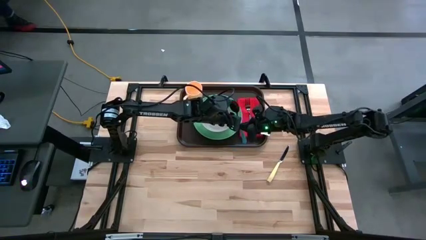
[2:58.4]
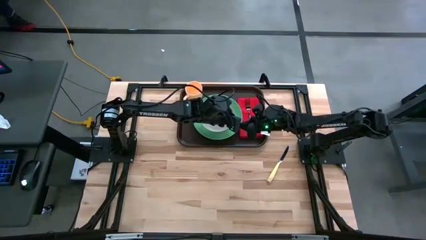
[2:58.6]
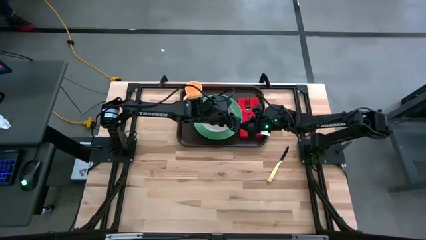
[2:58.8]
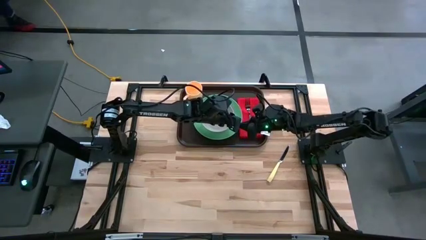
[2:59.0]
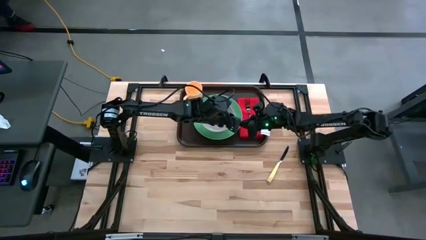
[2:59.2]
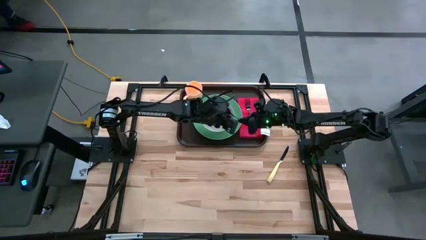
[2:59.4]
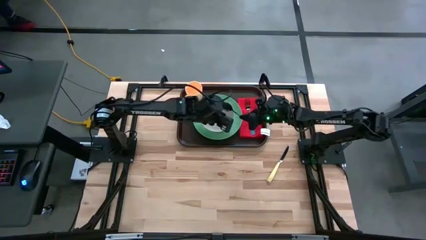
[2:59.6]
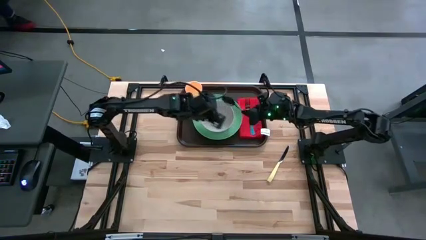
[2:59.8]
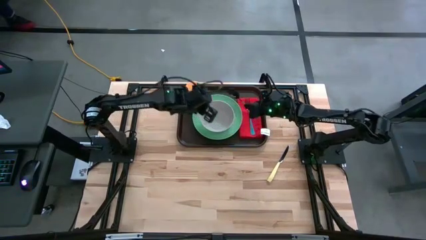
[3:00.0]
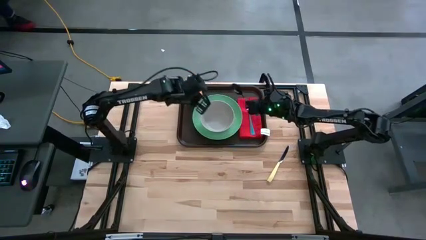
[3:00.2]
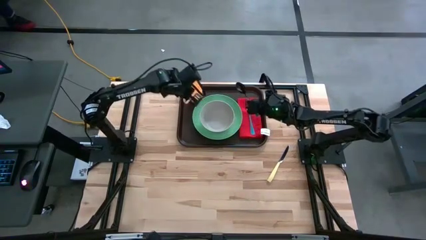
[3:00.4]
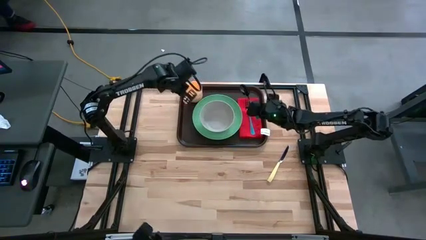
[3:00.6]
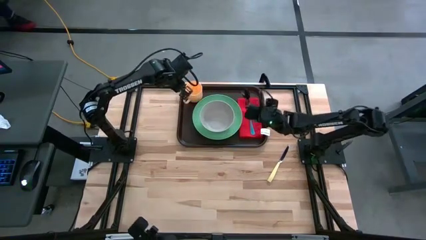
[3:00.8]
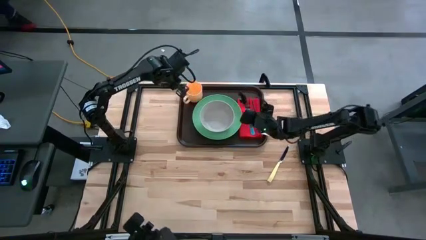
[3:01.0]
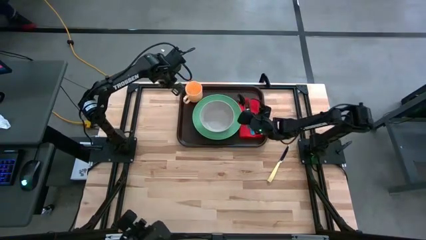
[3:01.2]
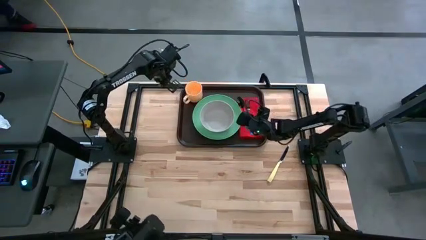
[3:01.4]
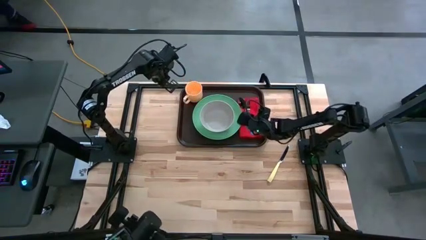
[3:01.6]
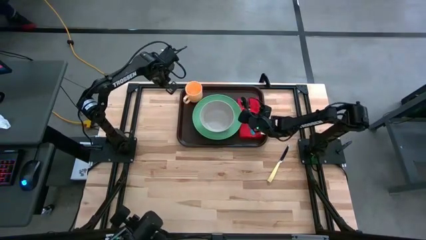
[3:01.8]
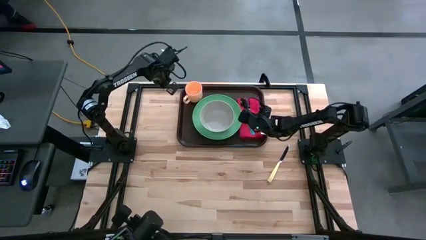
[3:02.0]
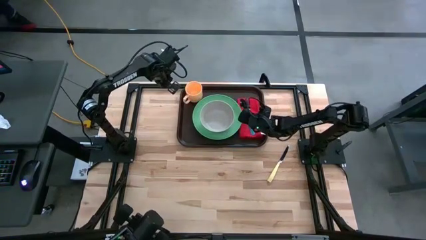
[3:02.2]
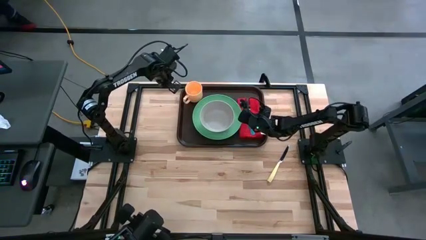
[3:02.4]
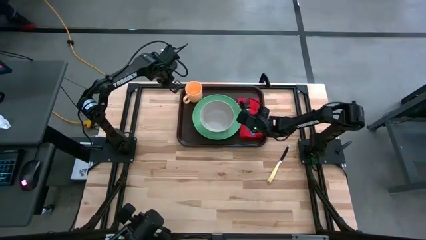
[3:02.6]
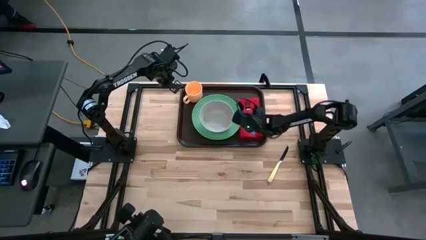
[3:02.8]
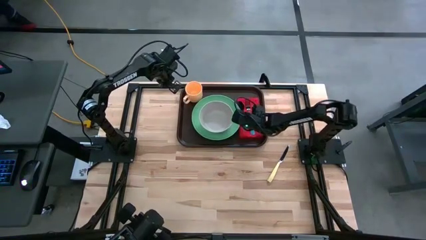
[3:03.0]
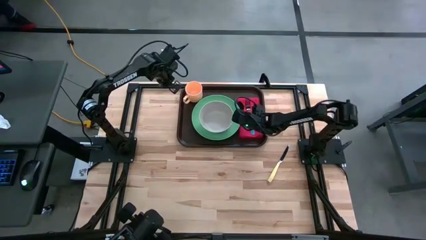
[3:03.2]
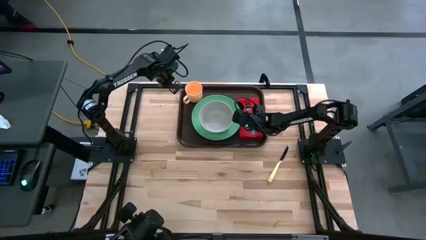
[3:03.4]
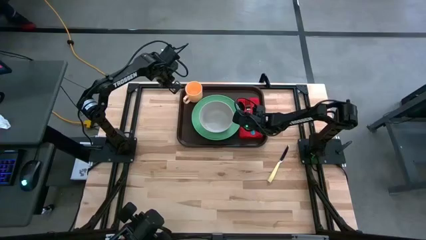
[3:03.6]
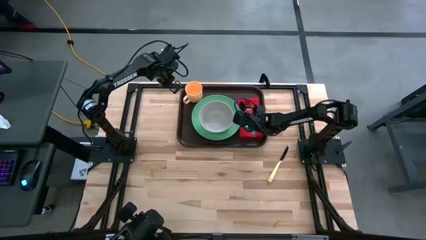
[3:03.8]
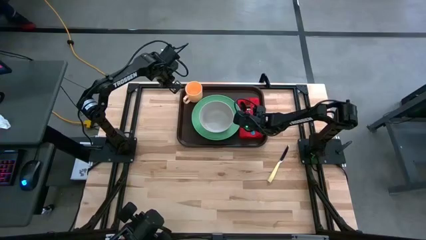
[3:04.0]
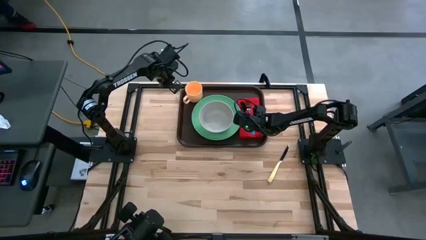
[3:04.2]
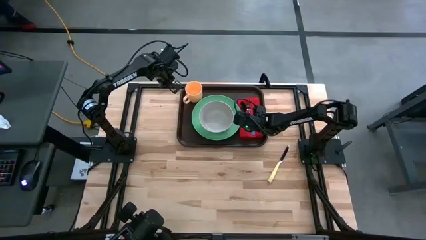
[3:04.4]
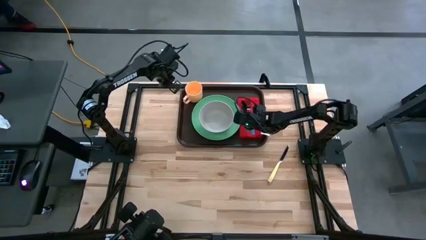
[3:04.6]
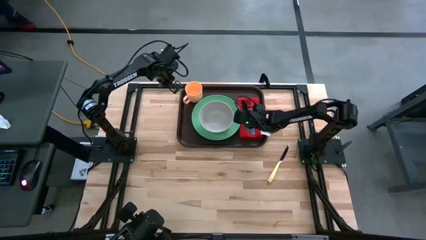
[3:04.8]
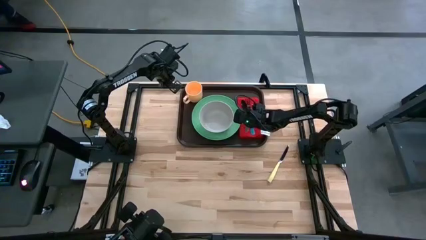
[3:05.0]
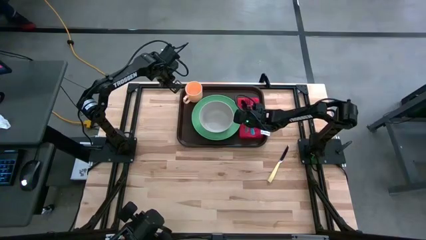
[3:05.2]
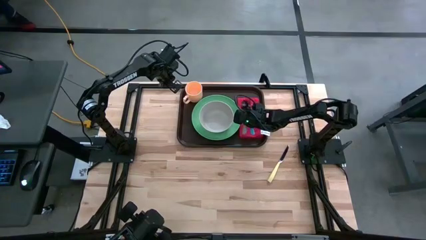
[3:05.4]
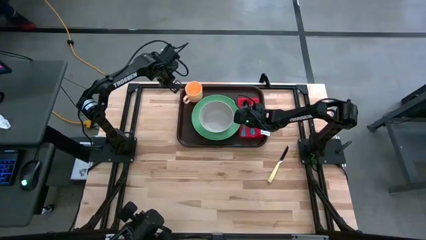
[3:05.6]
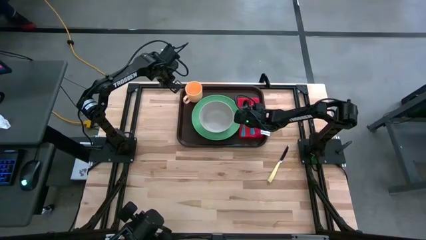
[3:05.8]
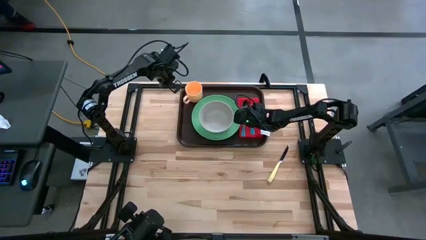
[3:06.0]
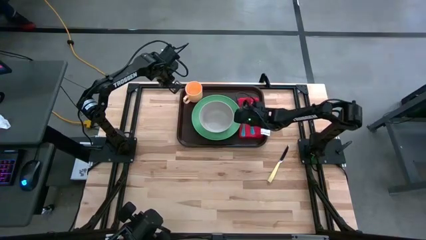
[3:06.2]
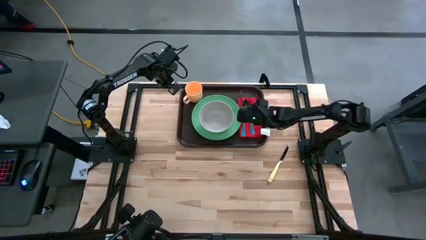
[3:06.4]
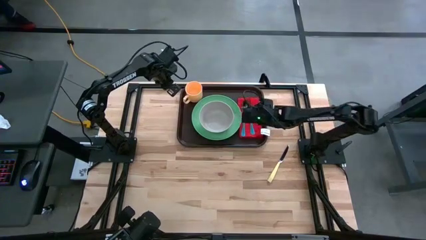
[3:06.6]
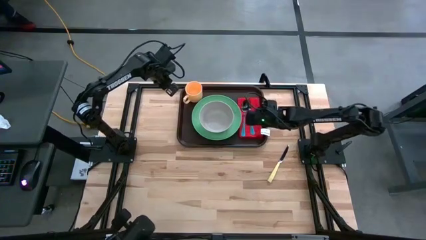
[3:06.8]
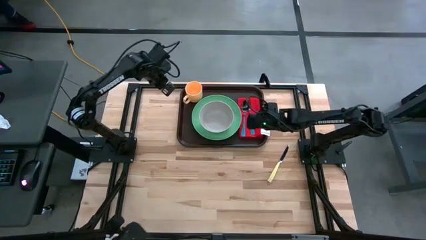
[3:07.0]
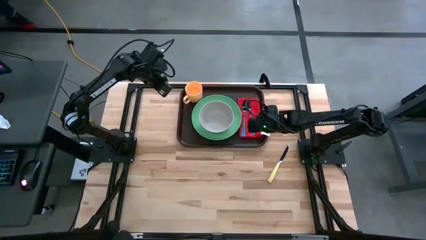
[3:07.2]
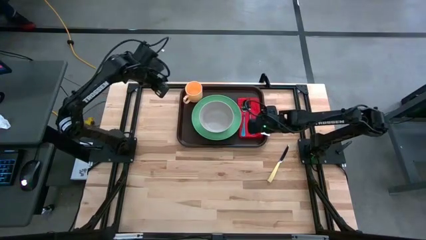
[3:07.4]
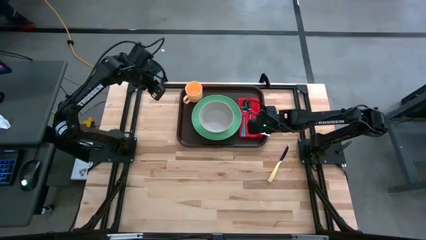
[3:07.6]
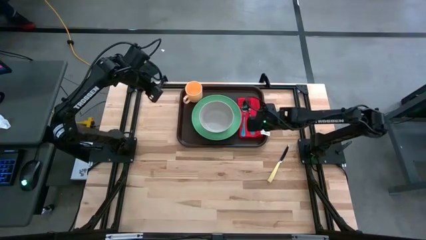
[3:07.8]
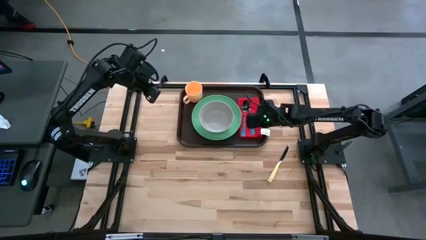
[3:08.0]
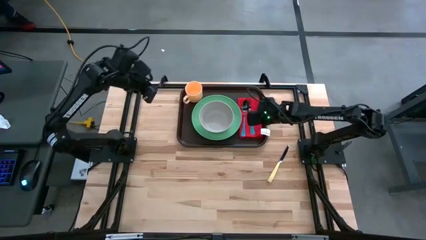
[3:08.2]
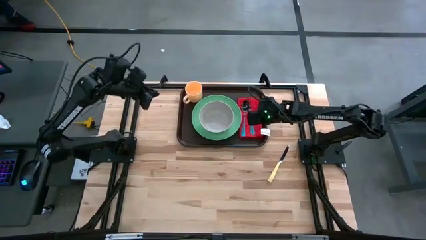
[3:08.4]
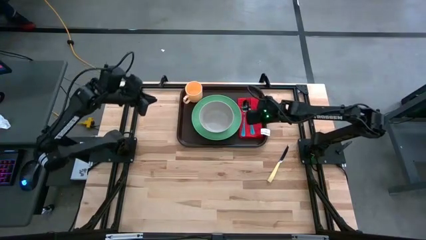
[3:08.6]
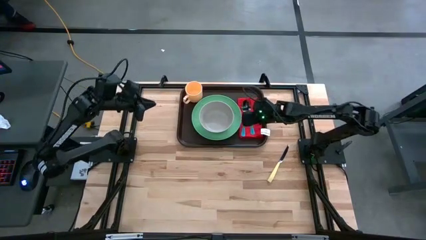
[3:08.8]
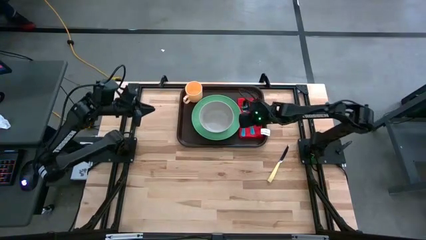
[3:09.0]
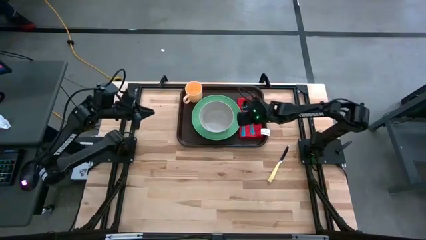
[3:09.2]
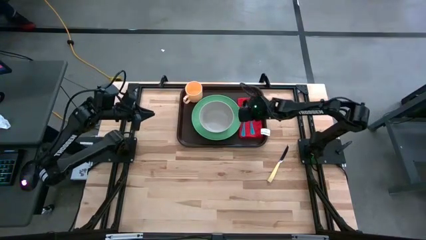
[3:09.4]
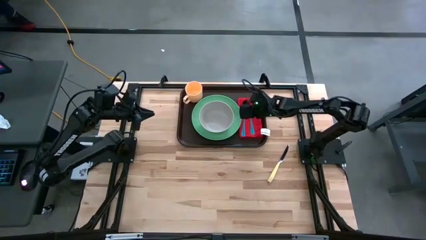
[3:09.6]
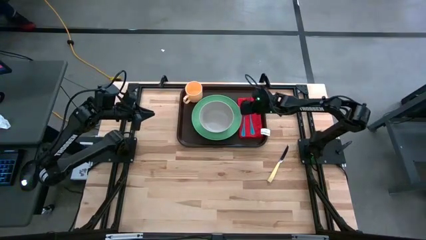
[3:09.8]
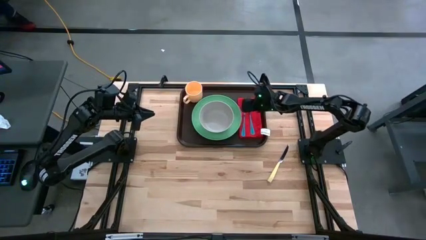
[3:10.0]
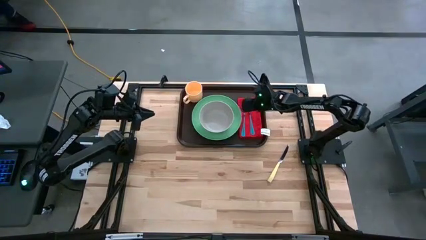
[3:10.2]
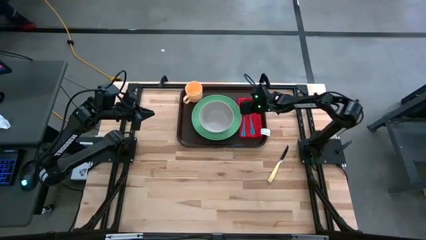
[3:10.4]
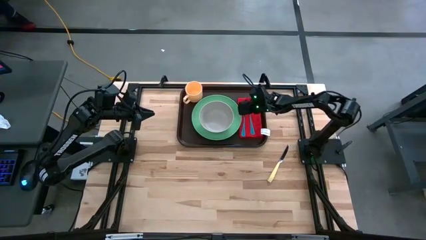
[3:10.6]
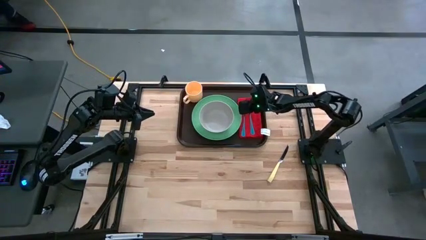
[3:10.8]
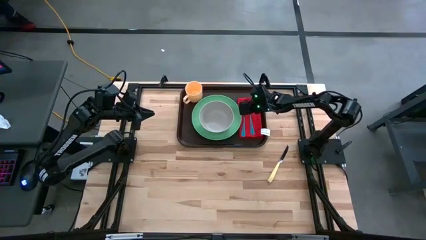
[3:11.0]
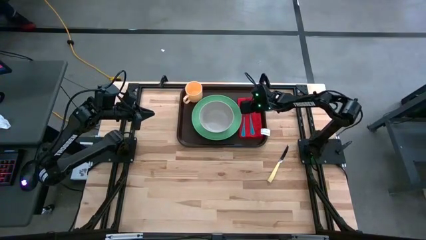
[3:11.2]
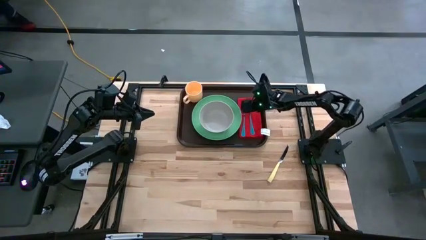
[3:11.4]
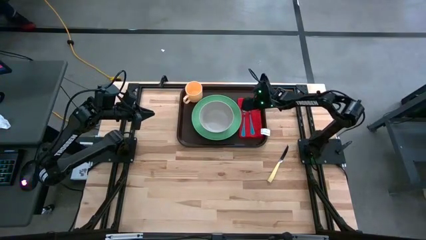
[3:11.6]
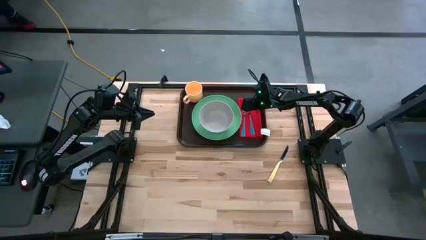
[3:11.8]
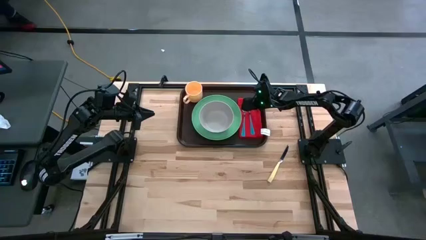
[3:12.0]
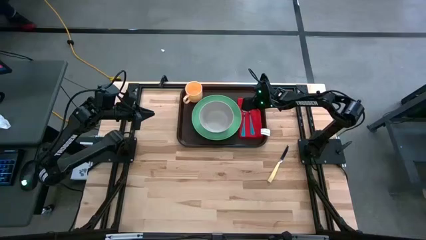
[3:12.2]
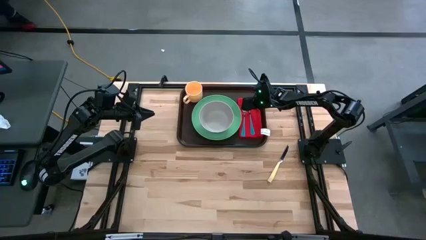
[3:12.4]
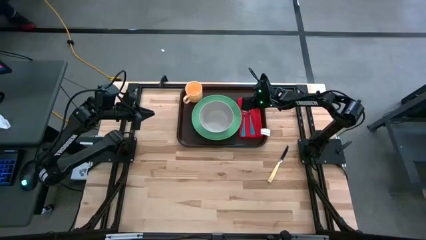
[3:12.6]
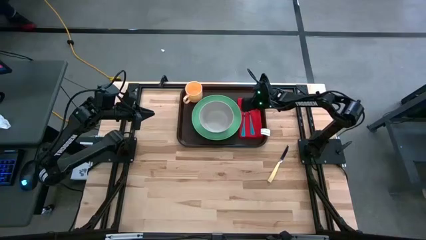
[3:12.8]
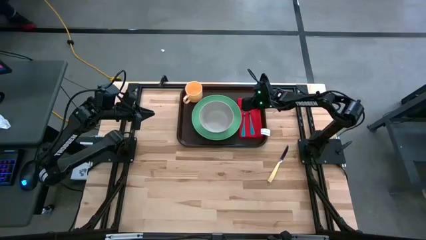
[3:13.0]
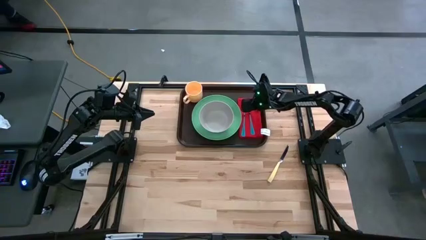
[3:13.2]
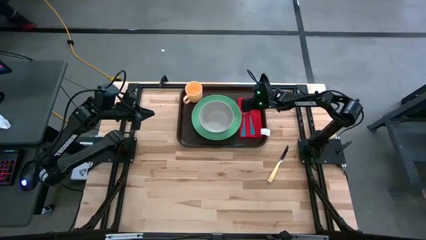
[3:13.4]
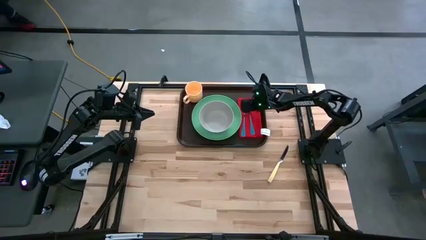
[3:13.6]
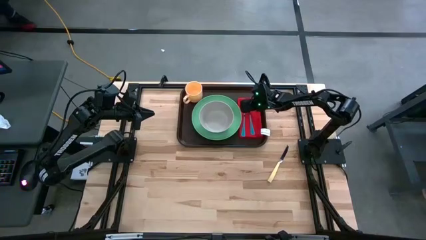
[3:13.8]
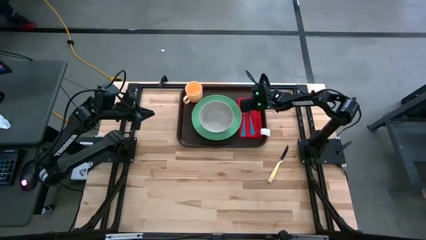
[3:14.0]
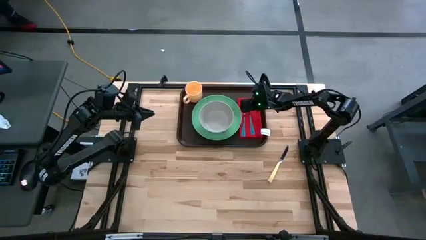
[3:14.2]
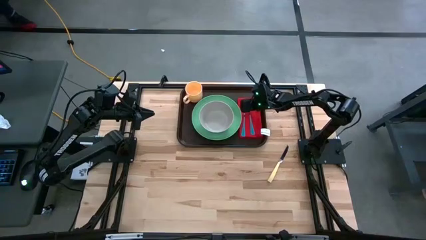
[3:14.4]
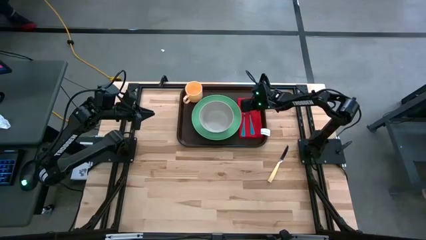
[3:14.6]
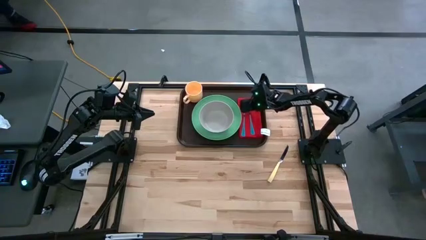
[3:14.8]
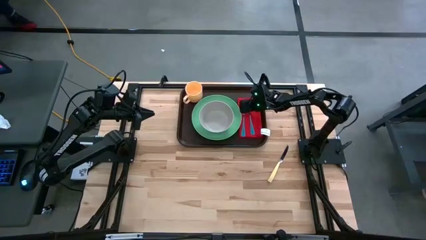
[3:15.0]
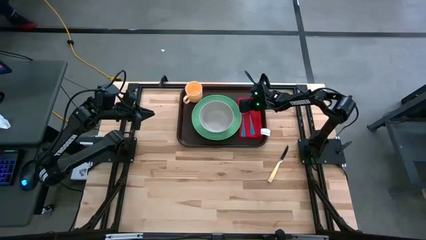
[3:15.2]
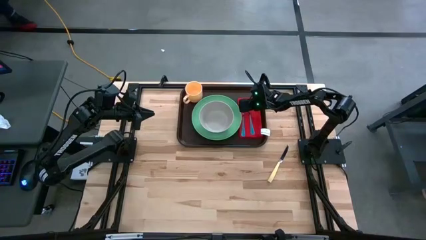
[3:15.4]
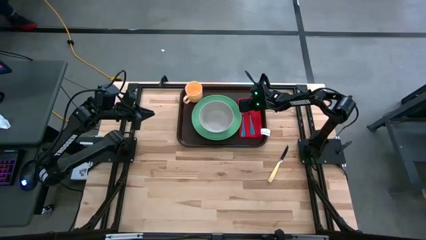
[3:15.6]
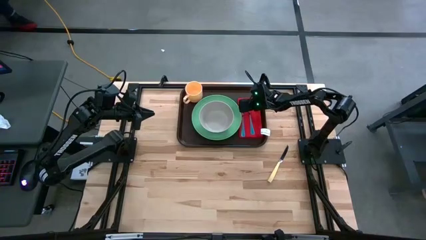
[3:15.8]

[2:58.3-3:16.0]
Task: Set up tray
Put the blue spoon on the red table napkin to right of the green plate
